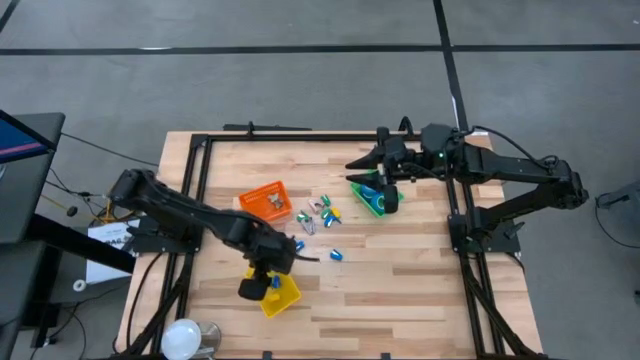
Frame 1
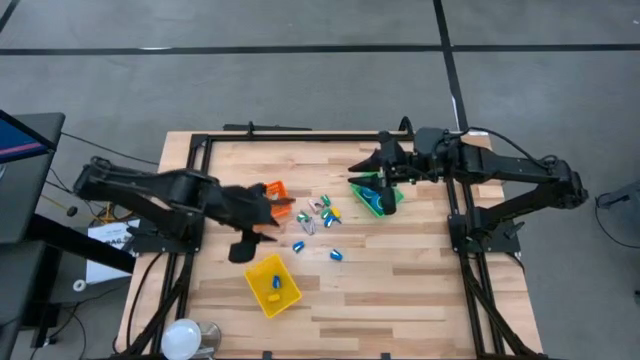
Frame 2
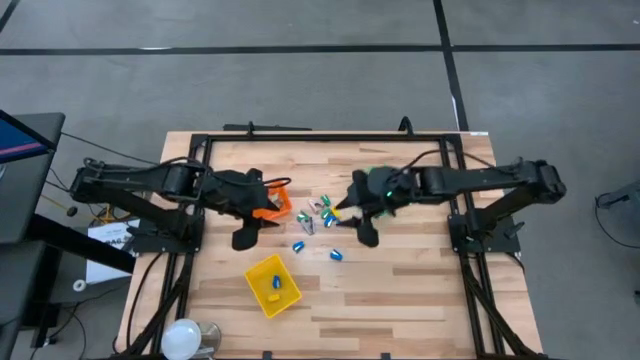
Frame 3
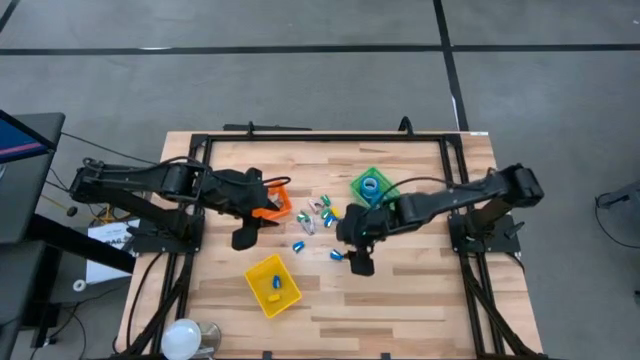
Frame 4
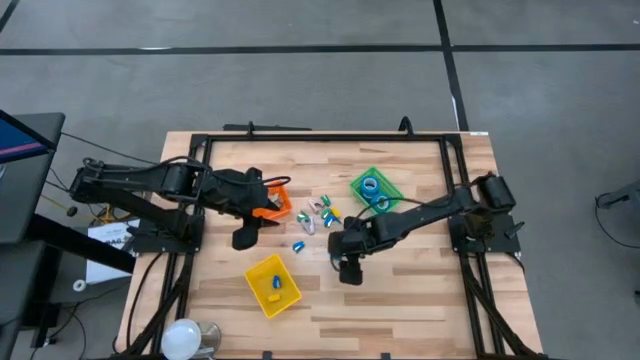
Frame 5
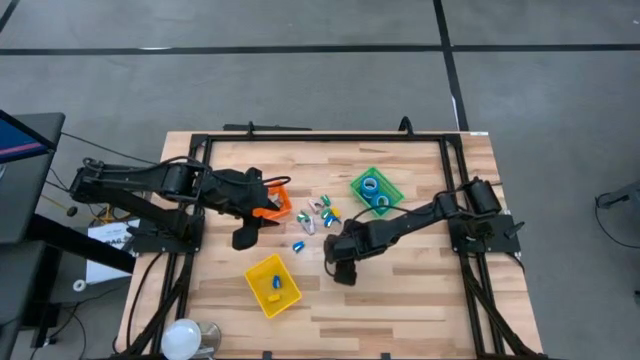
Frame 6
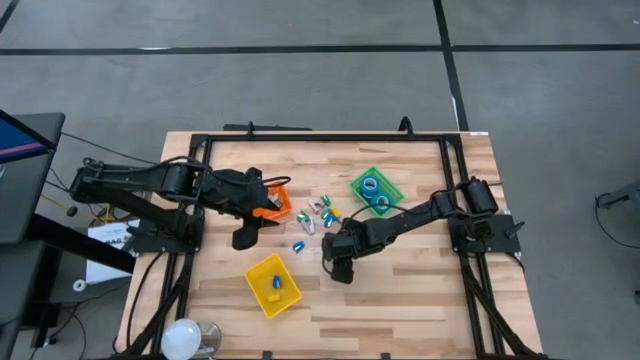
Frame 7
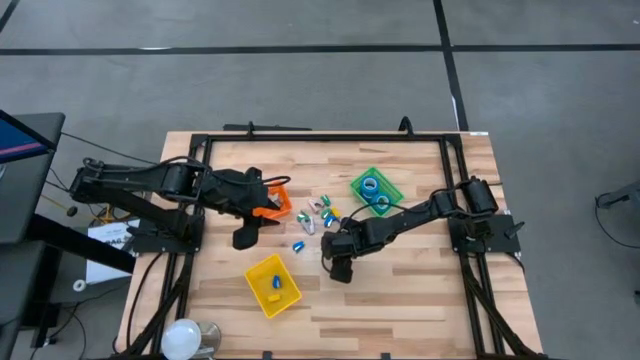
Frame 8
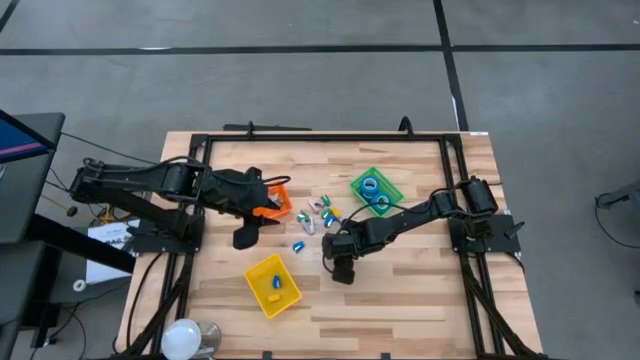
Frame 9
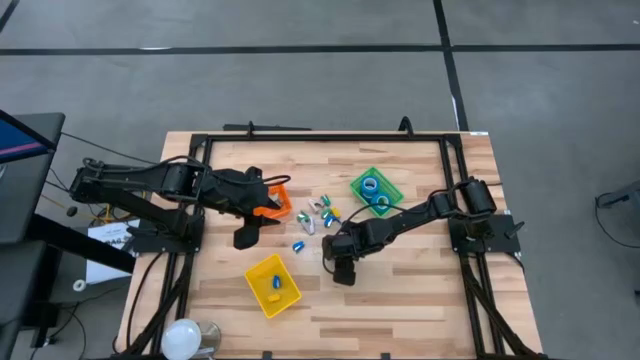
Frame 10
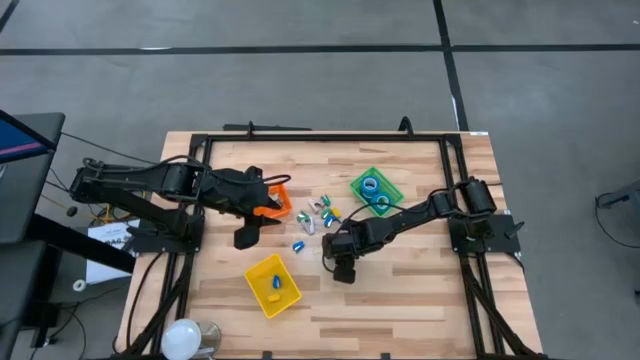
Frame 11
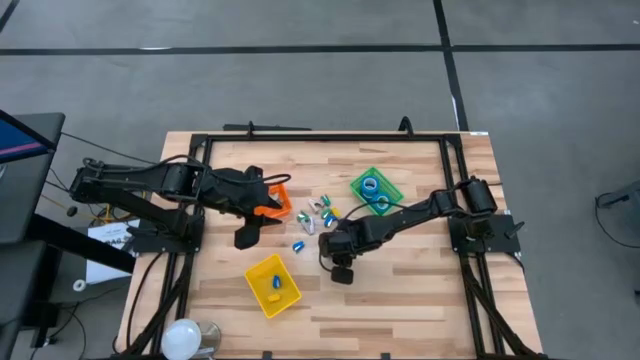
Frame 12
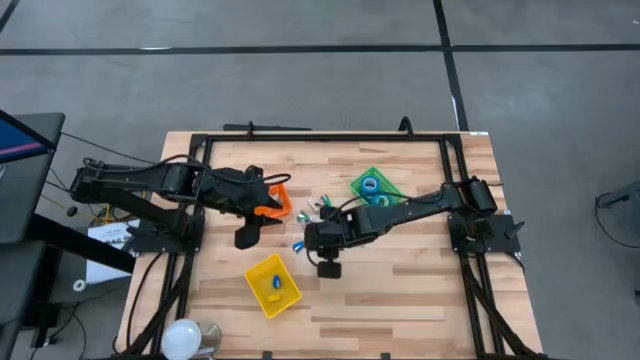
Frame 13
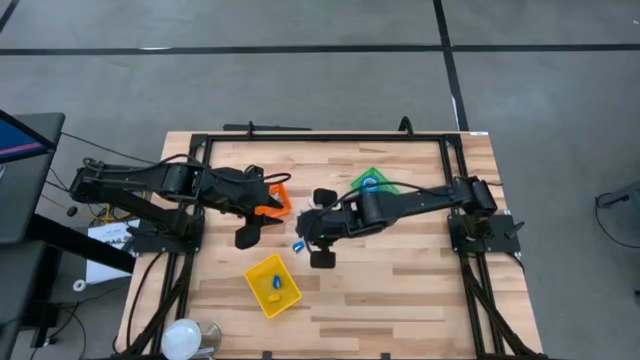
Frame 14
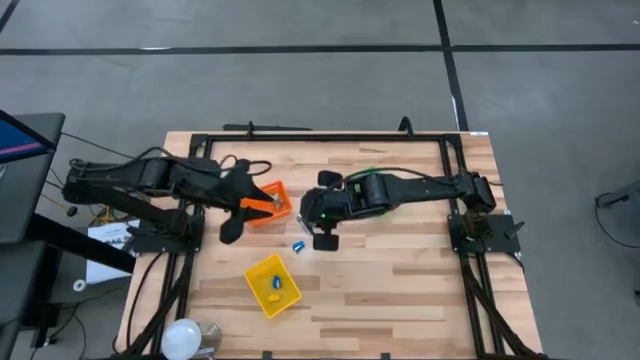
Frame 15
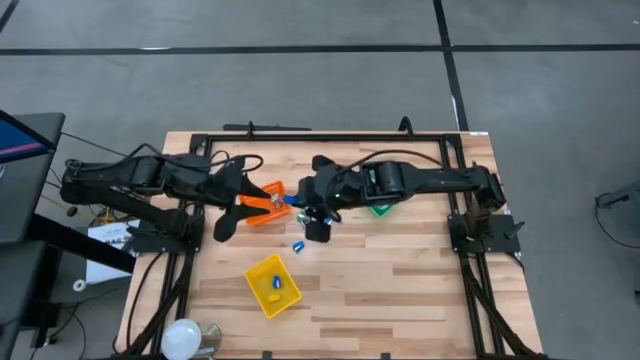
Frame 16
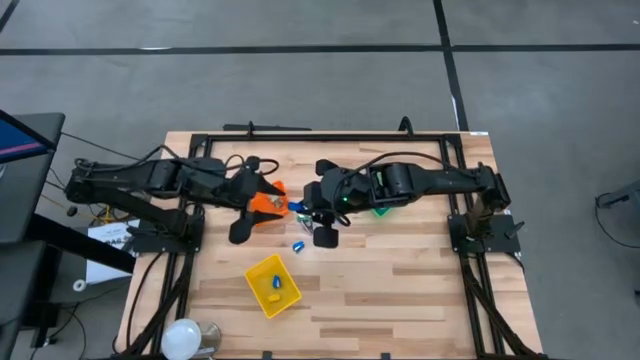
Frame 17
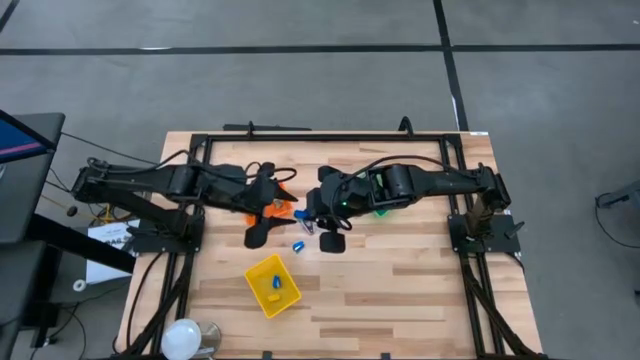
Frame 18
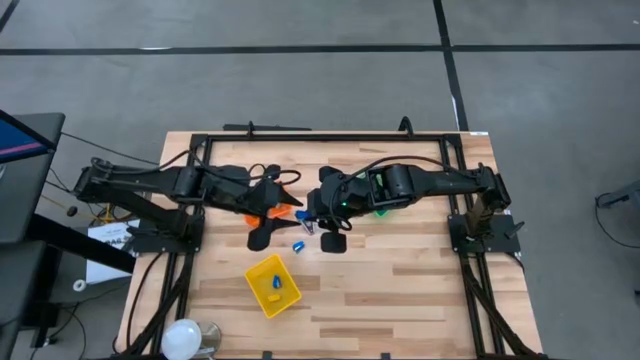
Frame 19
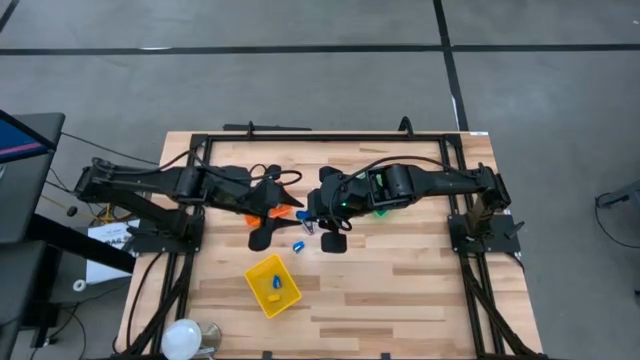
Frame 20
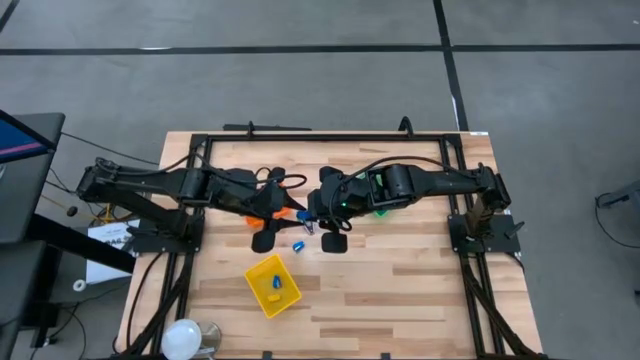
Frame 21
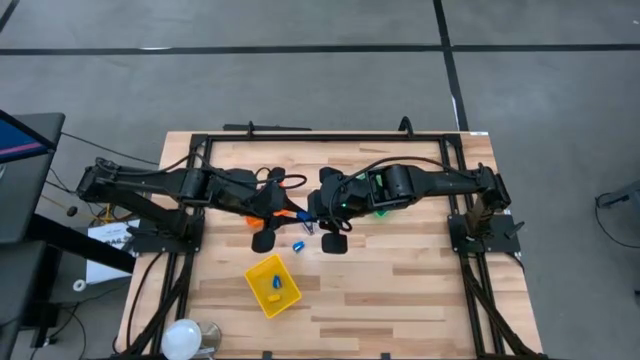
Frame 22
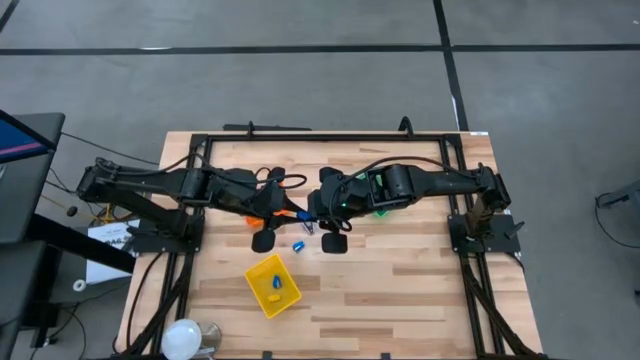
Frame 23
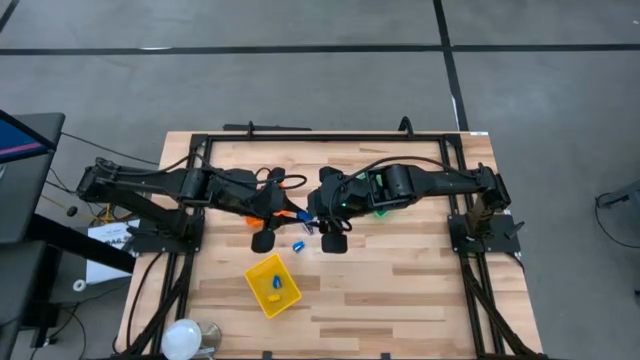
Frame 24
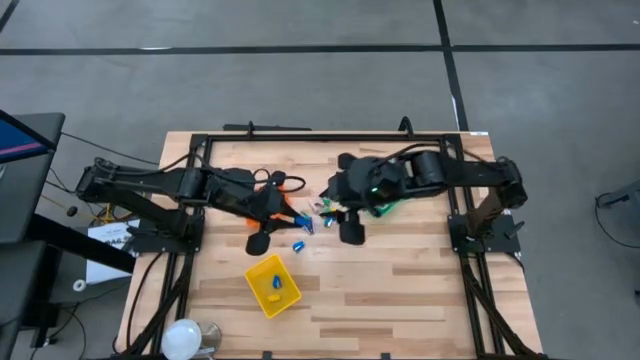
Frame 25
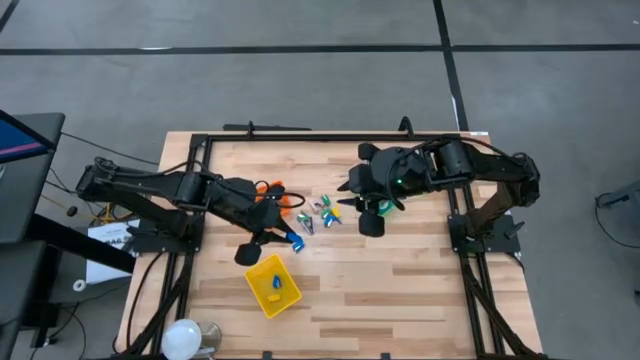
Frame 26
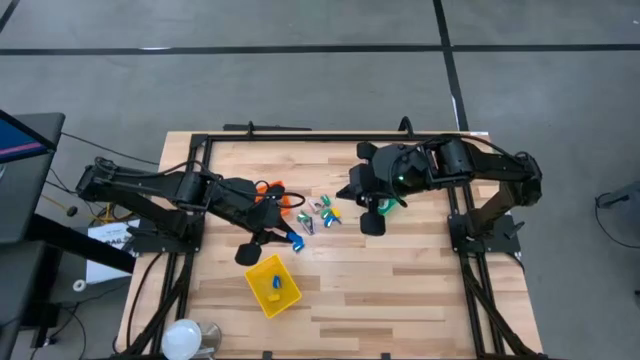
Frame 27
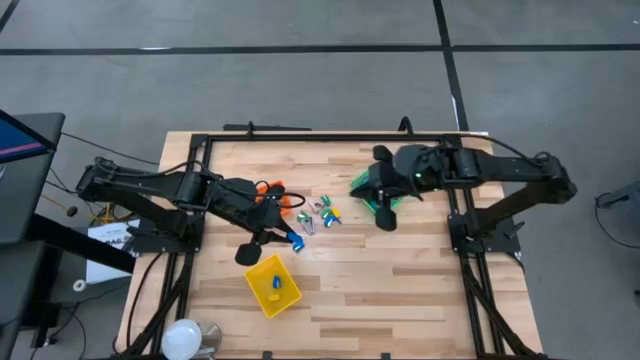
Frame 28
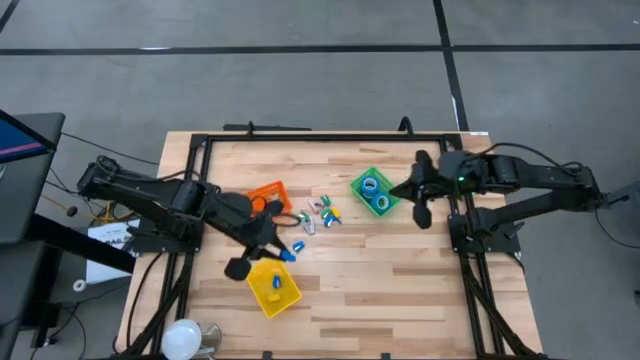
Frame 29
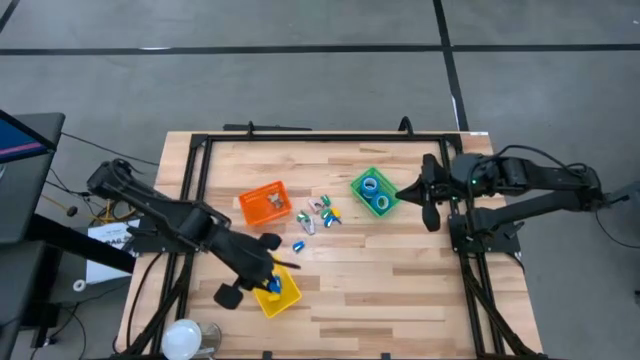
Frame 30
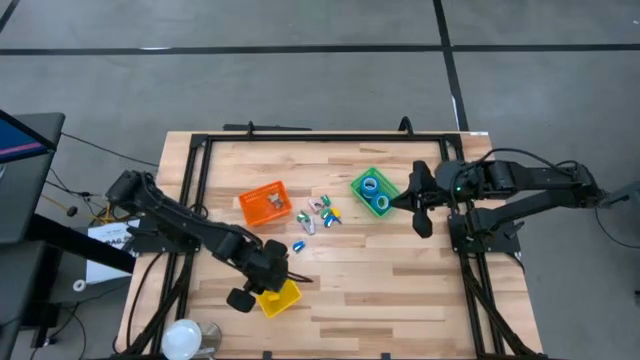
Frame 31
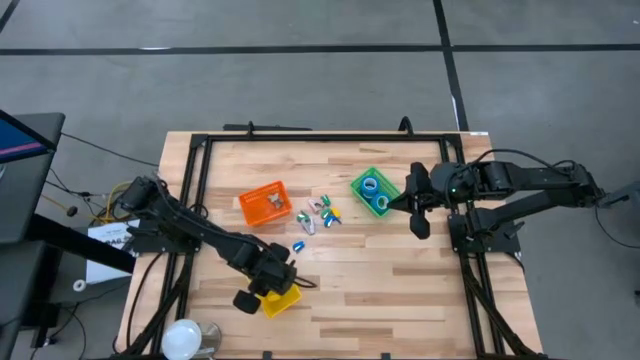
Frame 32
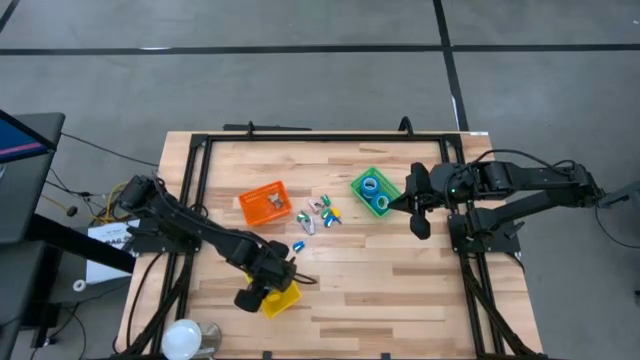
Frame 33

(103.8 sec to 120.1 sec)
Task: Pick and place Stapler, Stapler remover, tape
Put the blue stapler into the yellow basket

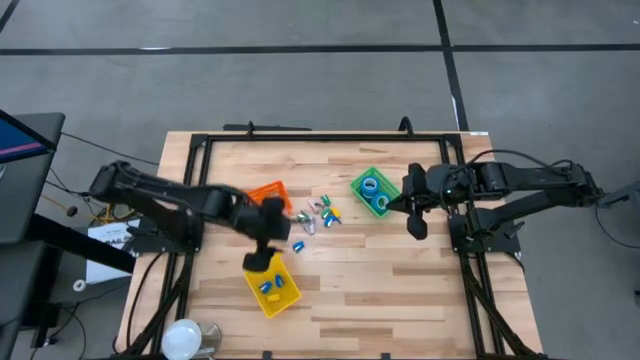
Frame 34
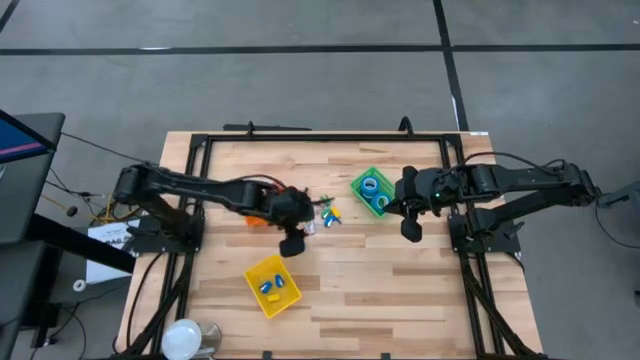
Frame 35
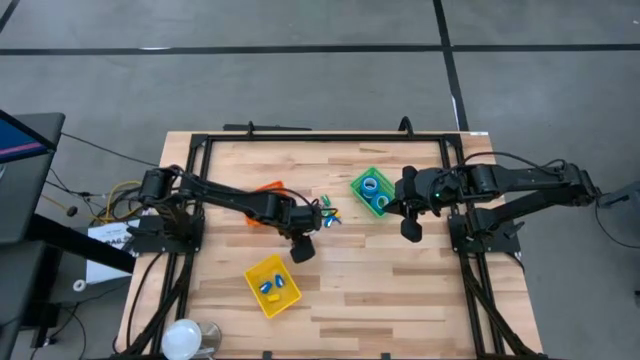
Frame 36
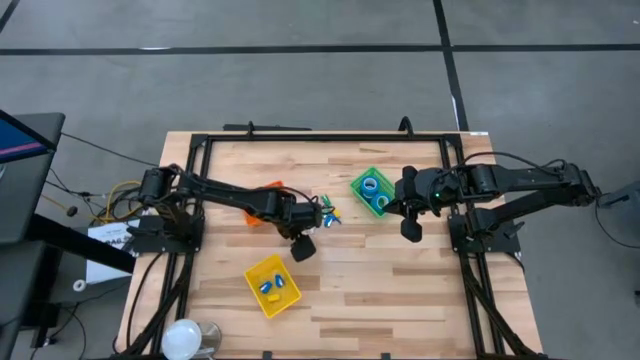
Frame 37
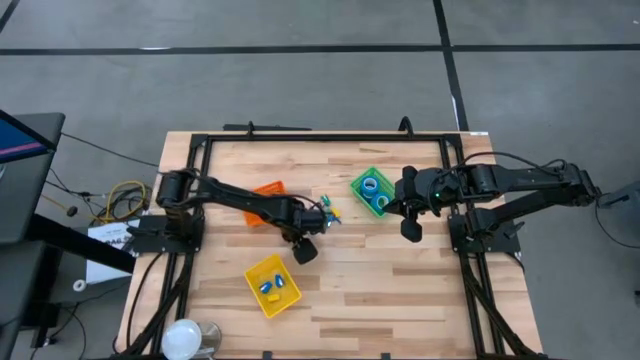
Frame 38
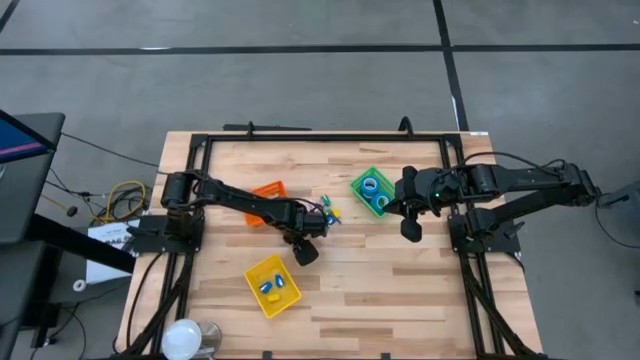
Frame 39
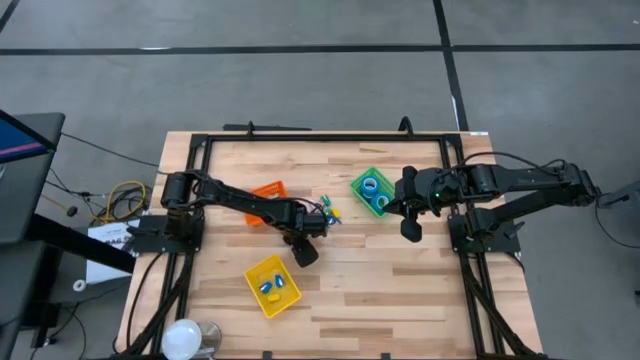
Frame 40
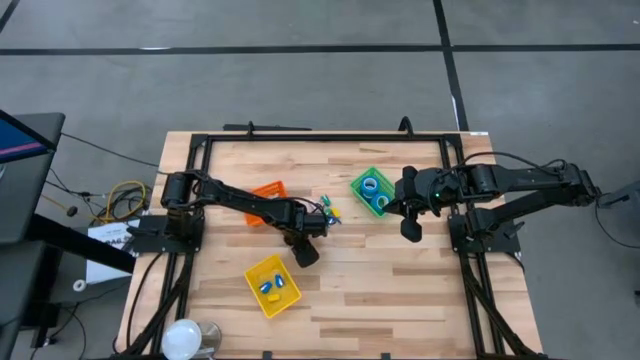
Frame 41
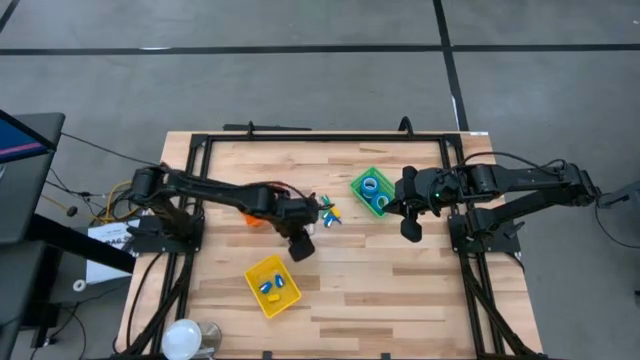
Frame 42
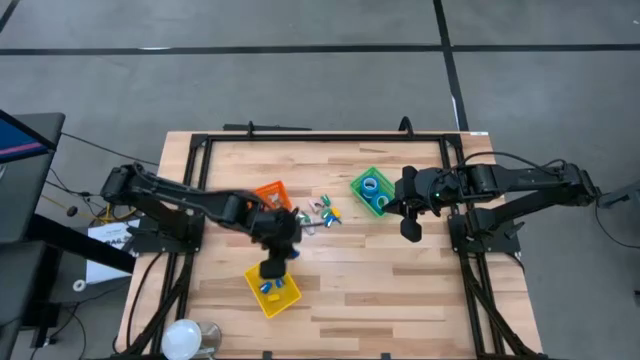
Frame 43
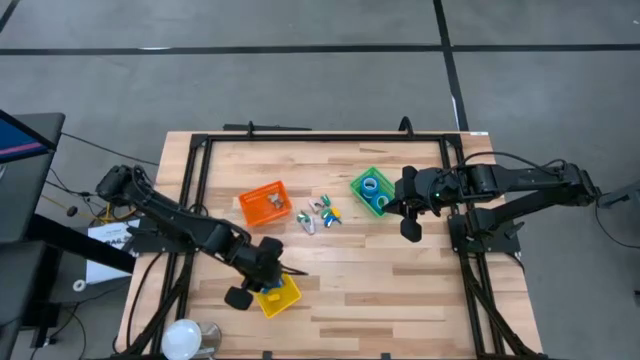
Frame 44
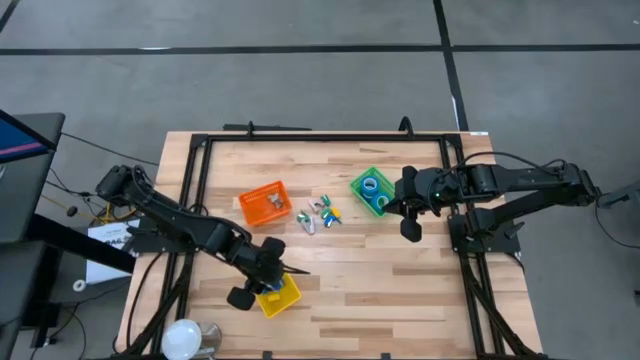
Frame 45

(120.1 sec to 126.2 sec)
Put the blue stapler into the yellow basket
